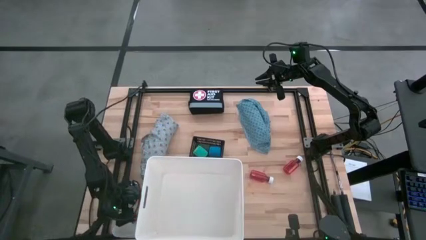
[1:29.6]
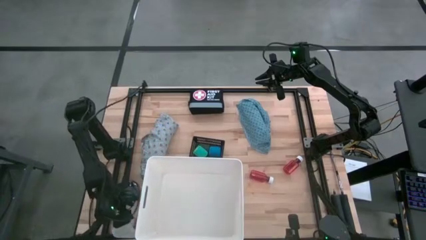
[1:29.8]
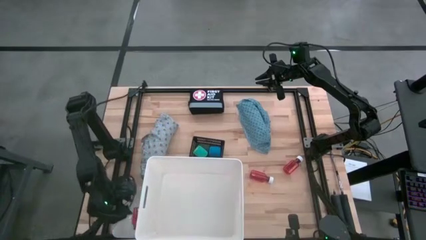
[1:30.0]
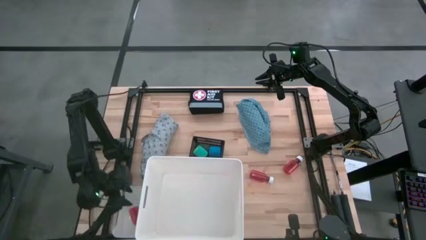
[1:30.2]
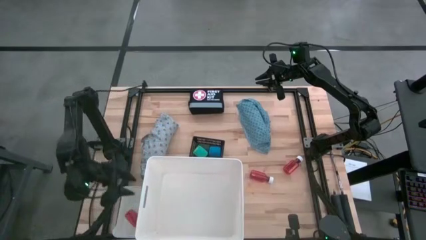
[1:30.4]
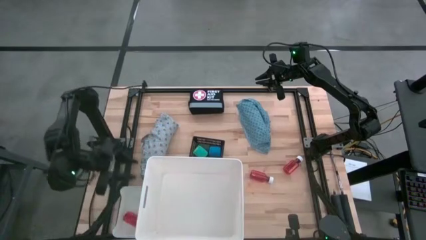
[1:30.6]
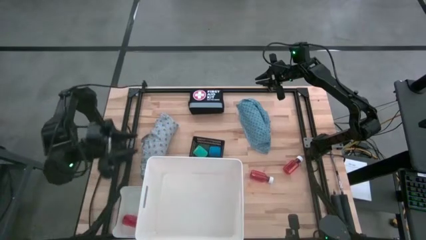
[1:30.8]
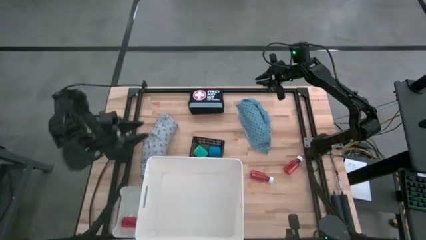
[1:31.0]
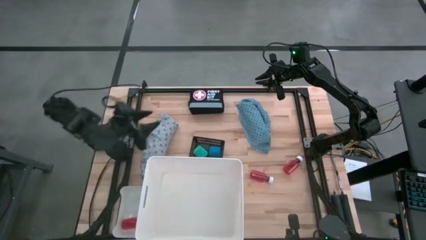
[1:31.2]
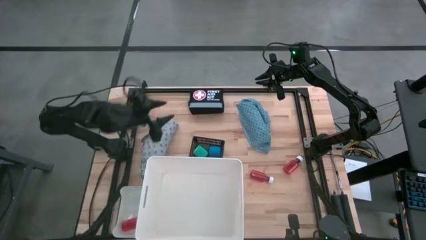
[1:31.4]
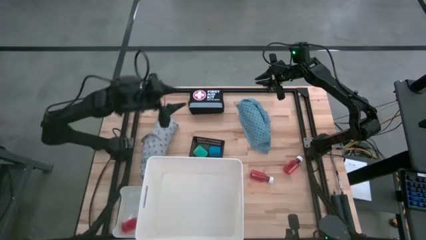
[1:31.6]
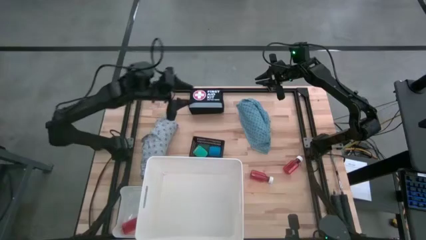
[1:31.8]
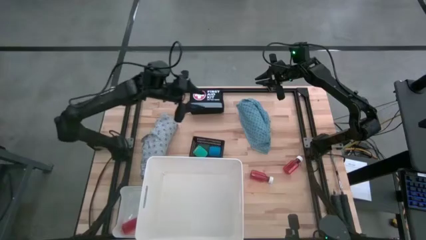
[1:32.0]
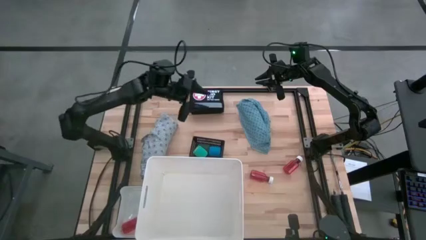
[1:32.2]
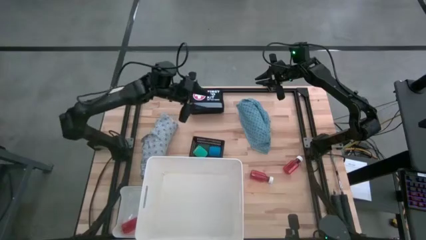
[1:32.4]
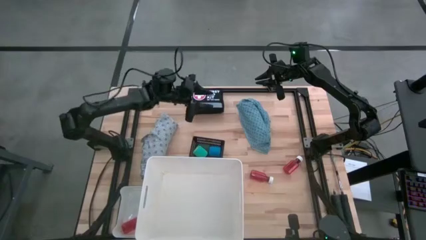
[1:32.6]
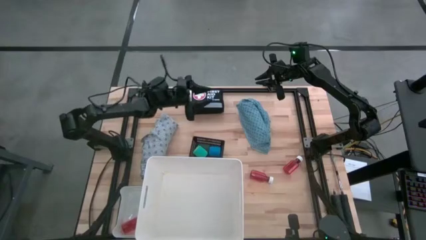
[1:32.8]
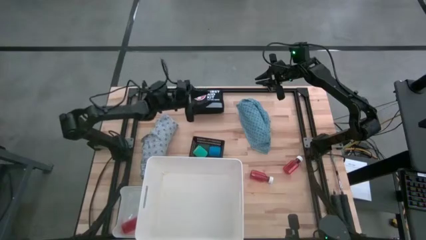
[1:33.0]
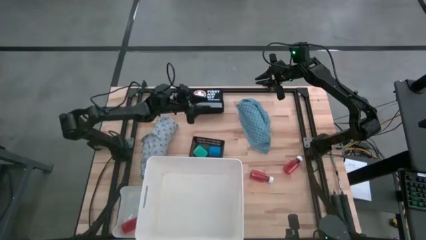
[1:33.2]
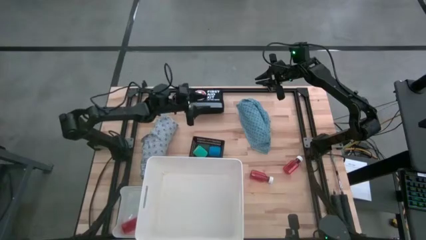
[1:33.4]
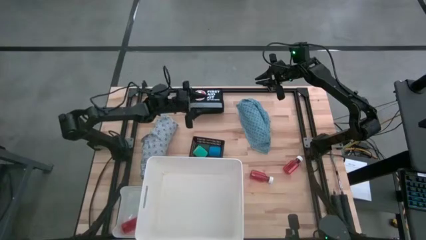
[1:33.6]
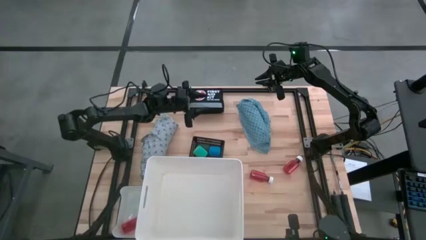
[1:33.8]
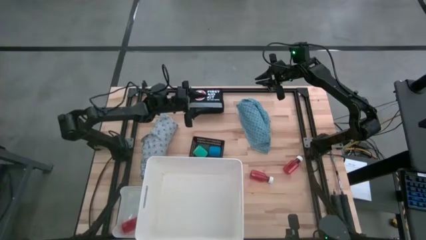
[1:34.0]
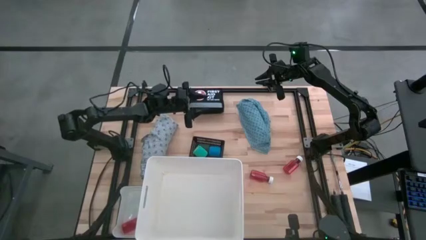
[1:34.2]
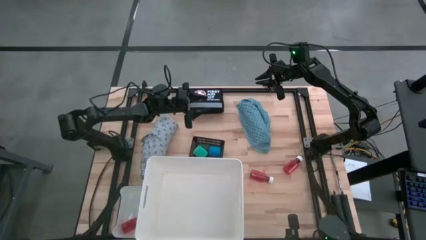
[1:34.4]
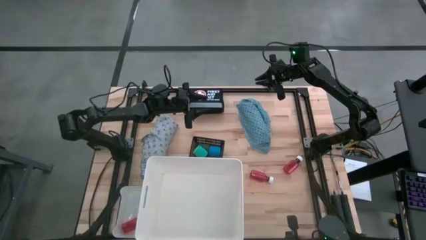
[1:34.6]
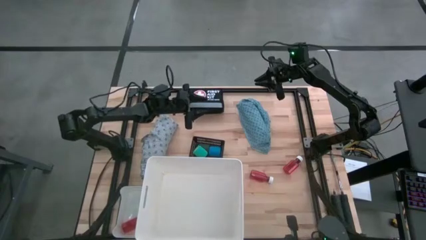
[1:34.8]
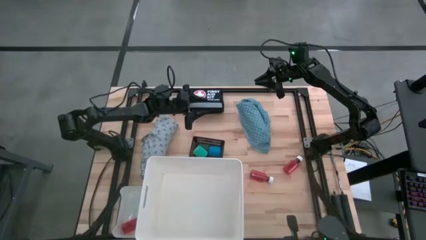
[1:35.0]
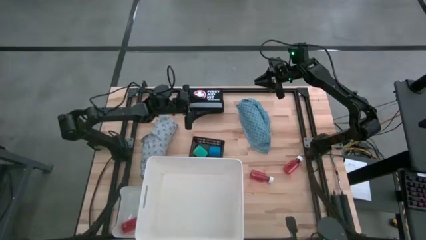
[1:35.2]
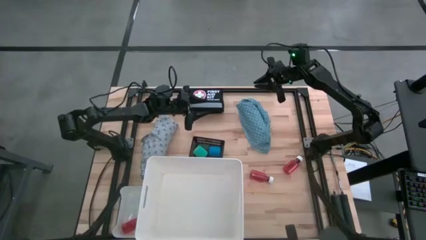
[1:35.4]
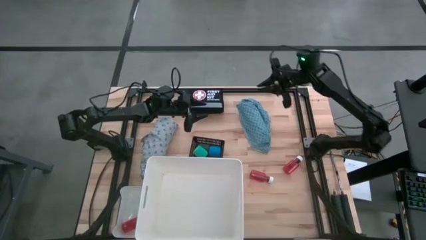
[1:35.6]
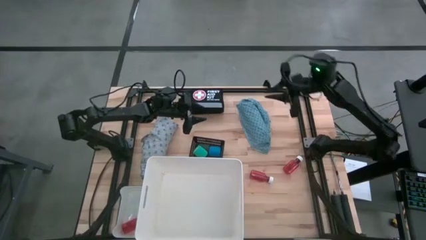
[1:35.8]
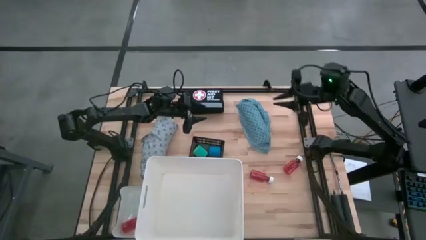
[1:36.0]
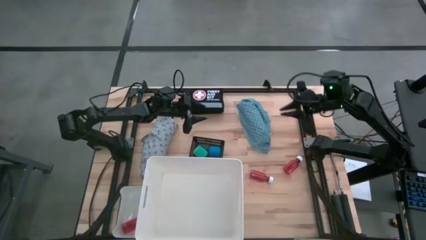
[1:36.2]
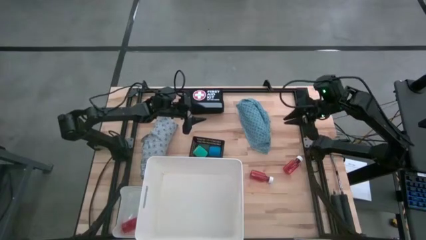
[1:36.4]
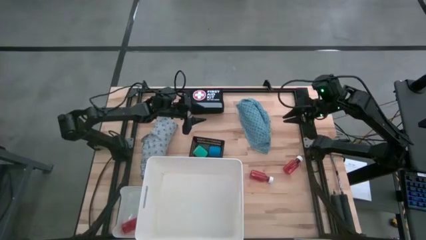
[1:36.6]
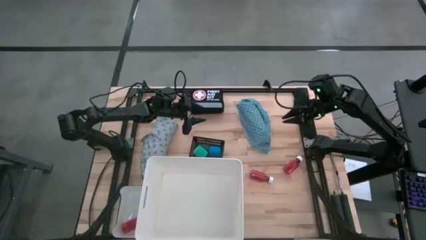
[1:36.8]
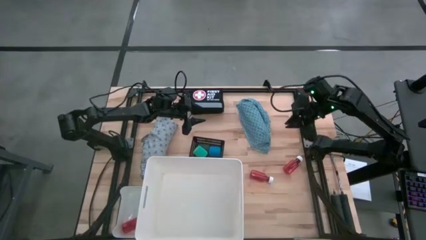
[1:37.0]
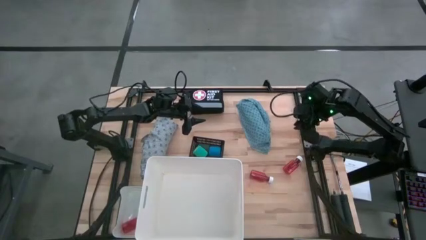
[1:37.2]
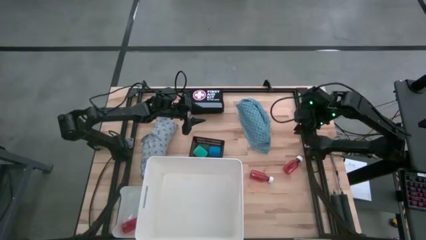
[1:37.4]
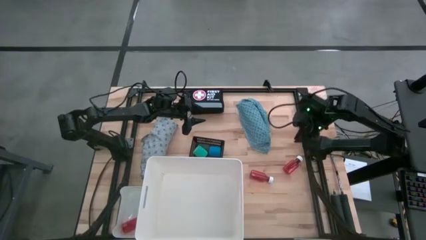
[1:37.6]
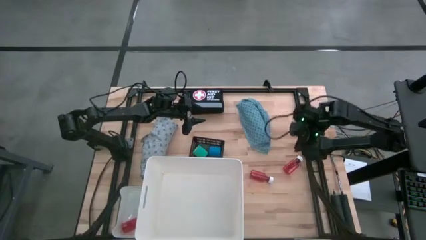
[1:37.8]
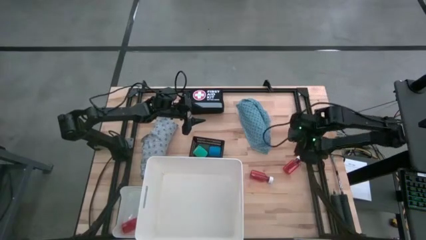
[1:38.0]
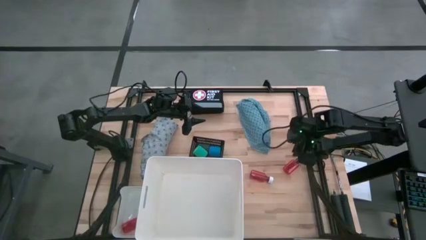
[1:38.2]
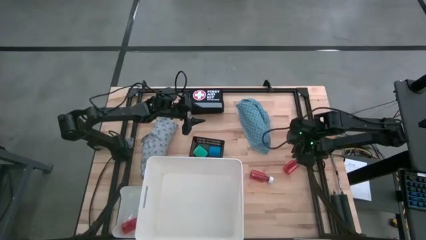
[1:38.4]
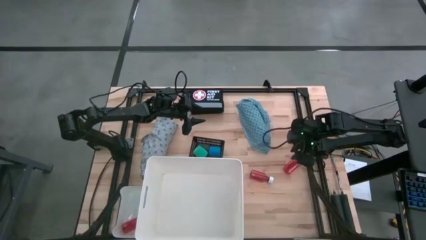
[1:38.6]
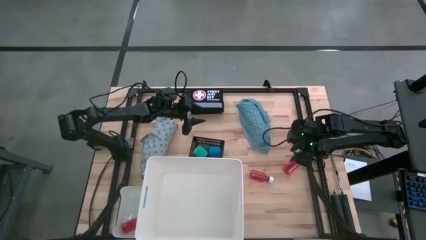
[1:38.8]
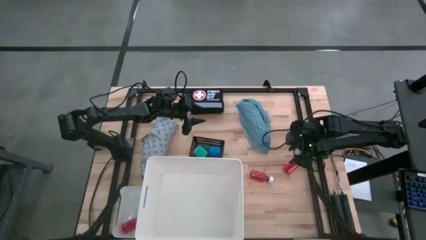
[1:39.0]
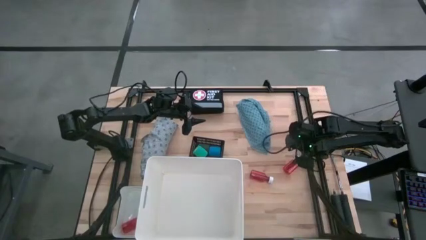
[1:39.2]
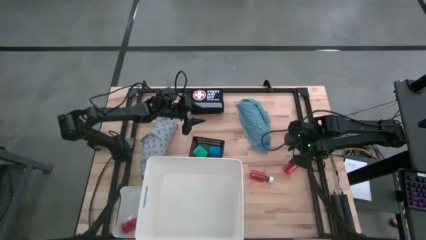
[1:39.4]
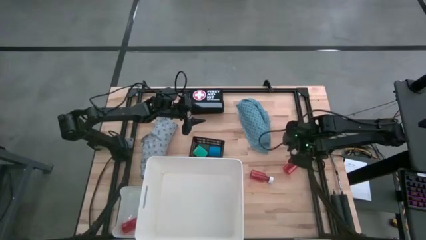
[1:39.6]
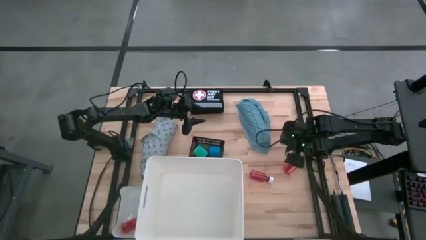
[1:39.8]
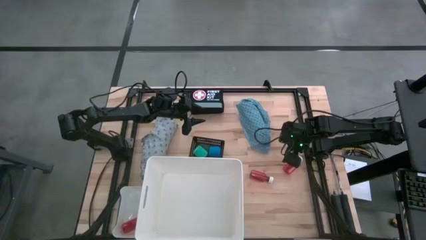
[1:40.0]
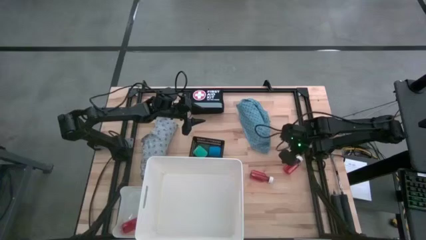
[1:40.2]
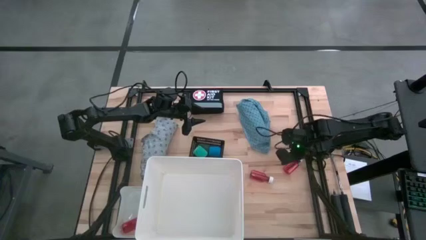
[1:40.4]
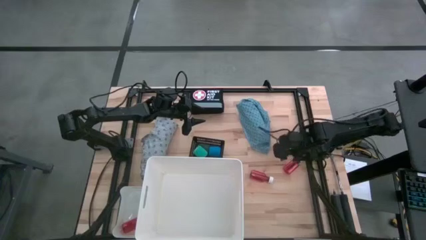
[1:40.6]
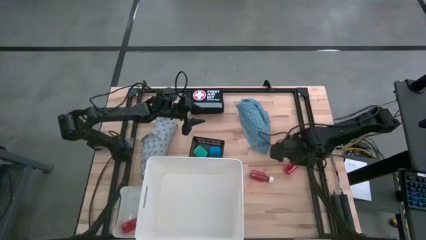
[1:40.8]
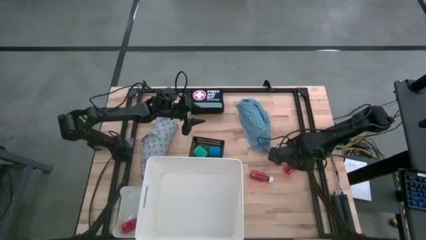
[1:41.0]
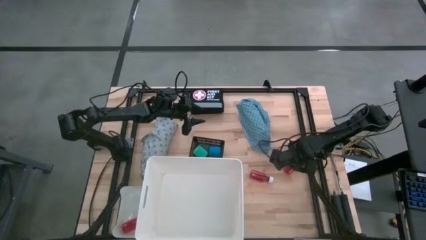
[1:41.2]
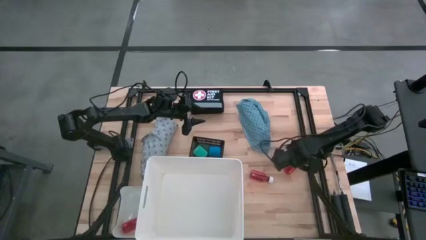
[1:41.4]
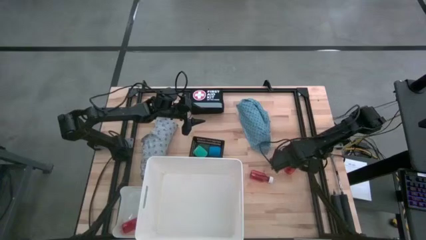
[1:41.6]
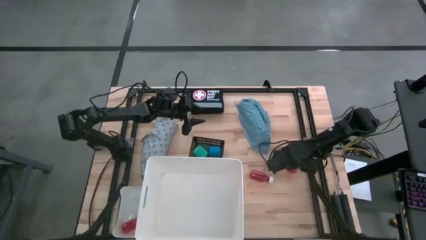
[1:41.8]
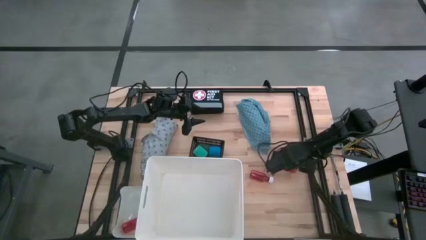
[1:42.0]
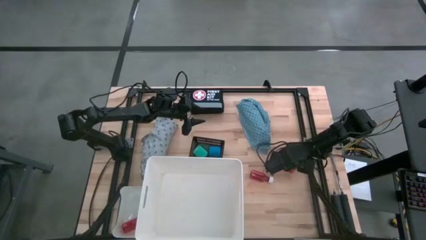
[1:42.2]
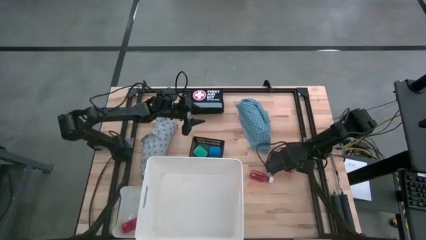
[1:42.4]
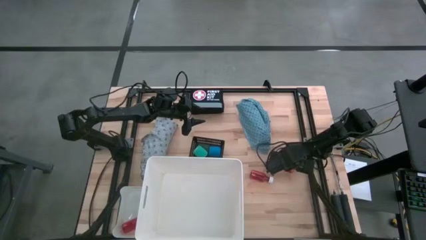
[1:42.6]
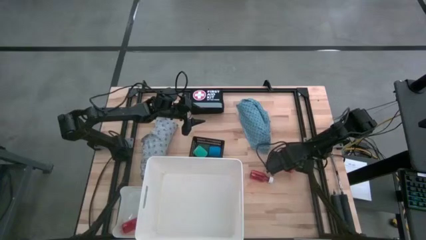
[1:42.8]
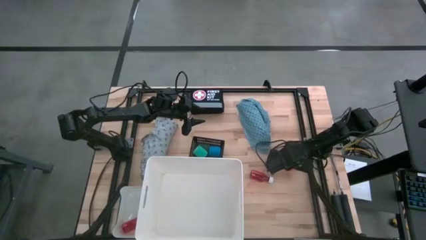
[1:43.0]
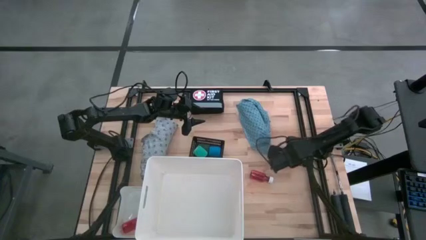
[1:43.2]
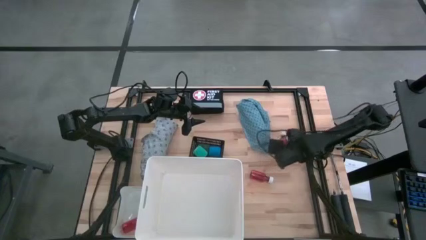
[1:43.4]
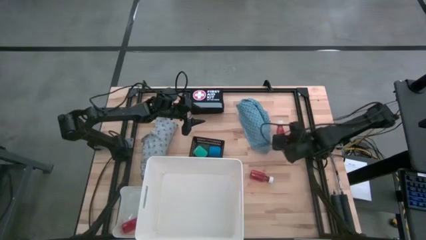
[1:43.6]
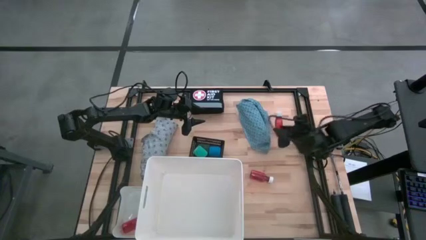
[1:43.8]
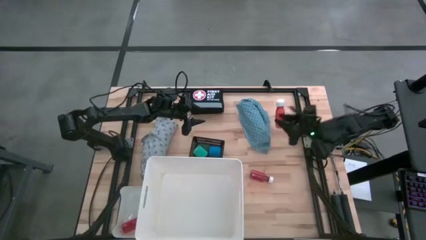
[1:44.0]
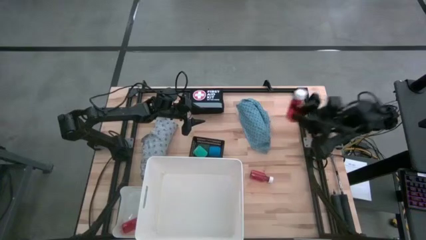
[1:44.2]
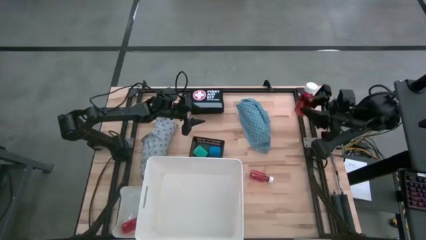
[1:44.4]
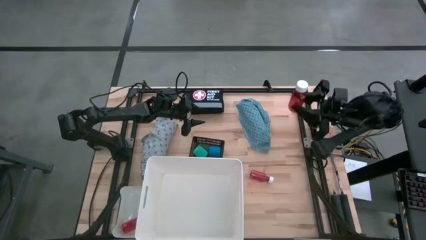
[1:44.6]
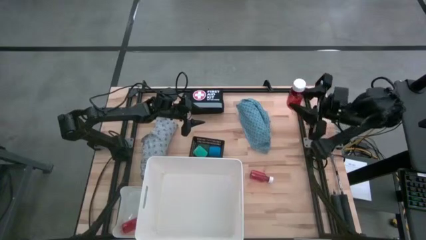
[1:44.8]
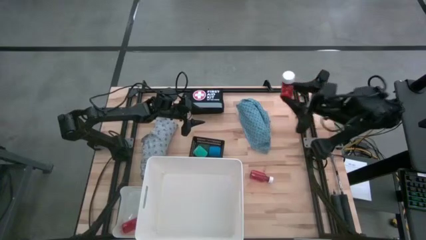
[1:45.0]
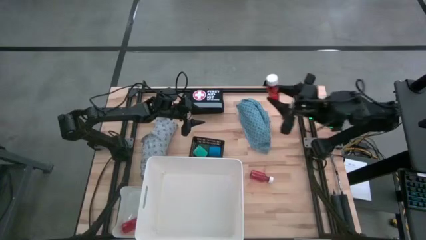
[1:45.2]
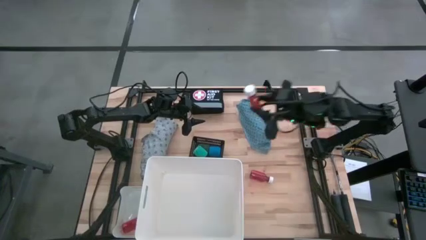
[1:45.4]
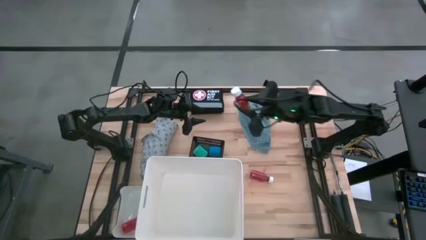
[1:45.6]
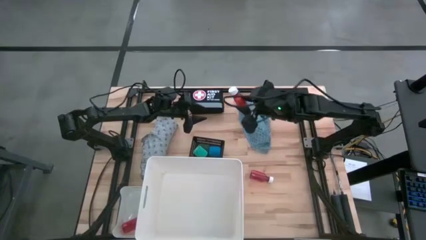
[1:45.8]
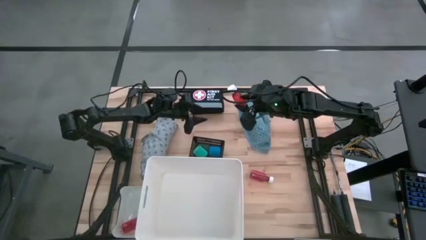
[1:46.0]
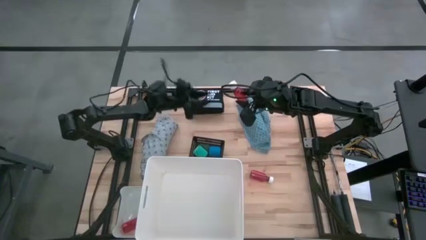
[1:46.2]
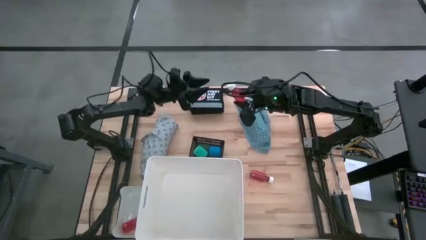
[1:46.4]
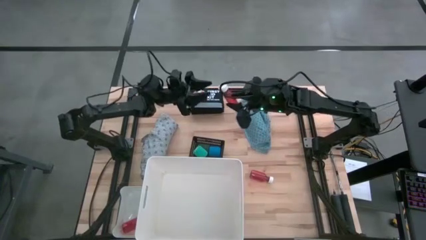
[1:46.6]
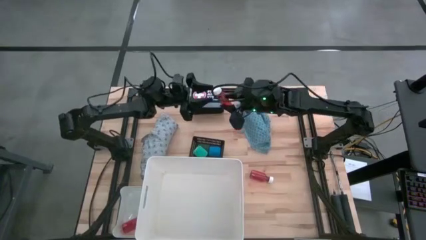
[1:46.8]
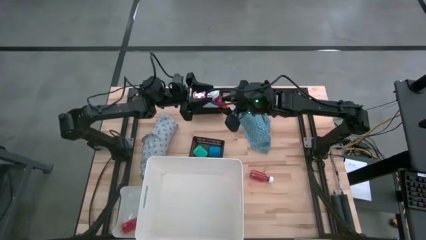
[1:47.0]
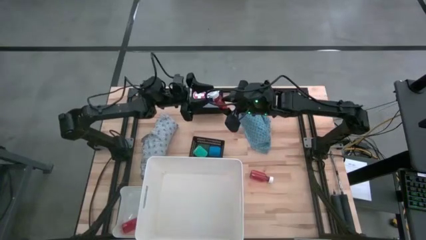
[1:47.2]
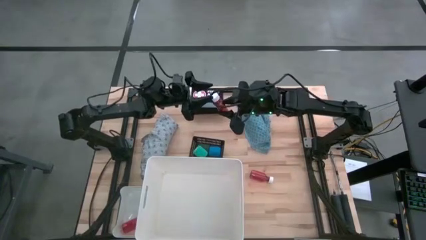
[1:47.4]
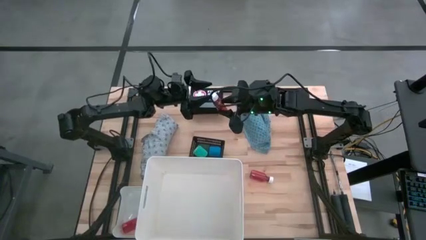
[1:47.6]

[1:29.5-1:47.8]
Task: Pick & Place Medicine items
Put the right red medicine bottle into the white bin
